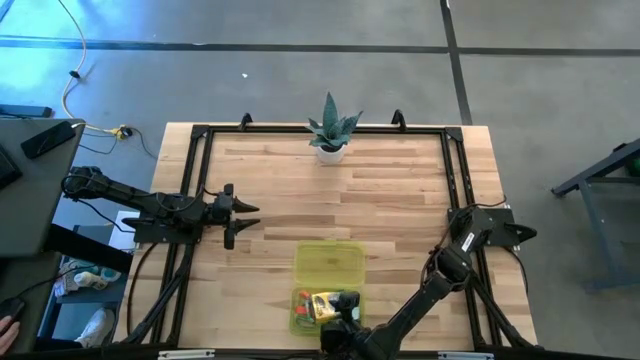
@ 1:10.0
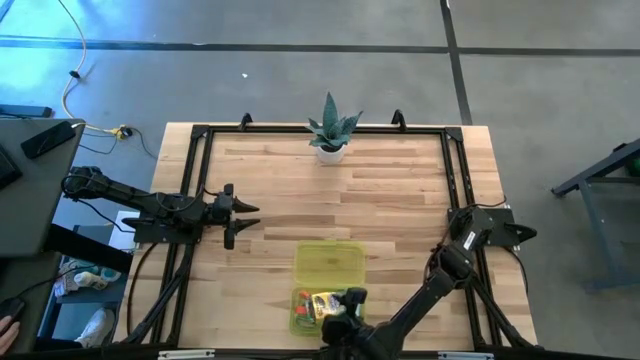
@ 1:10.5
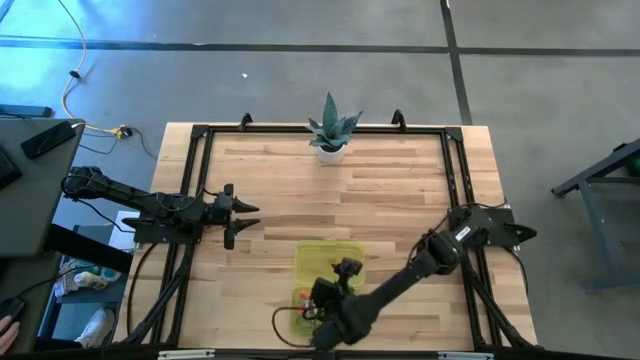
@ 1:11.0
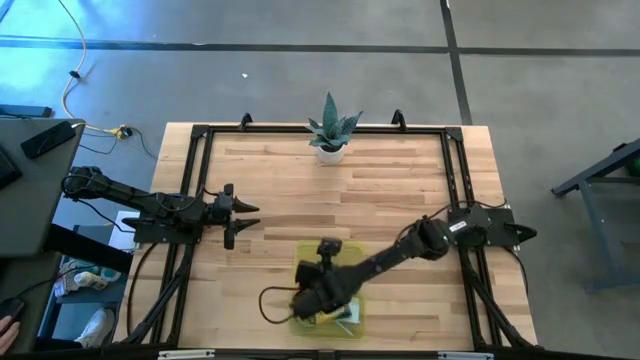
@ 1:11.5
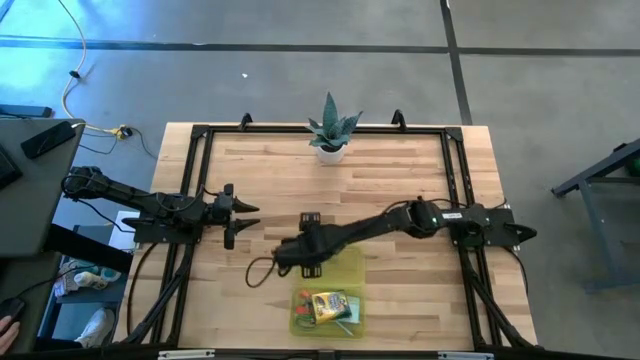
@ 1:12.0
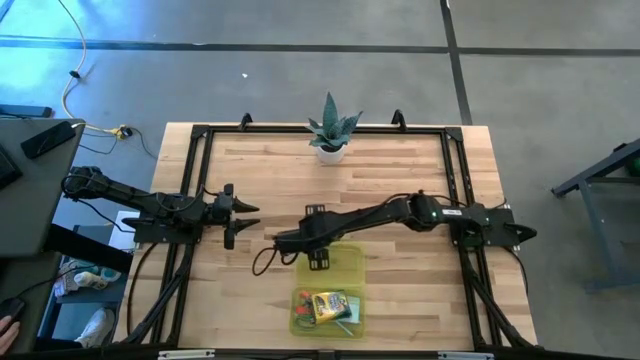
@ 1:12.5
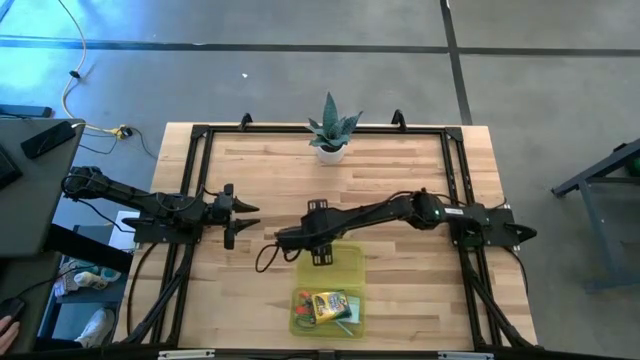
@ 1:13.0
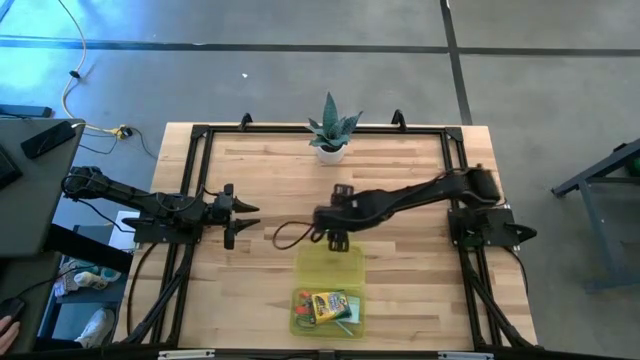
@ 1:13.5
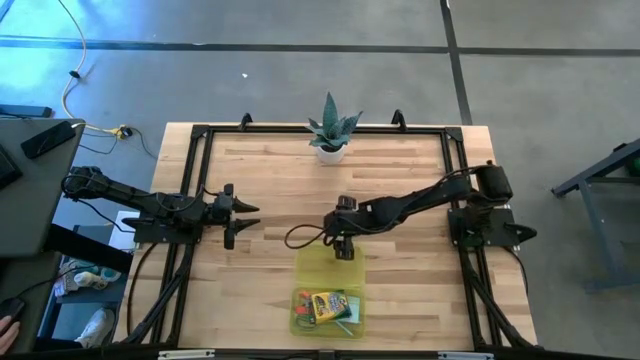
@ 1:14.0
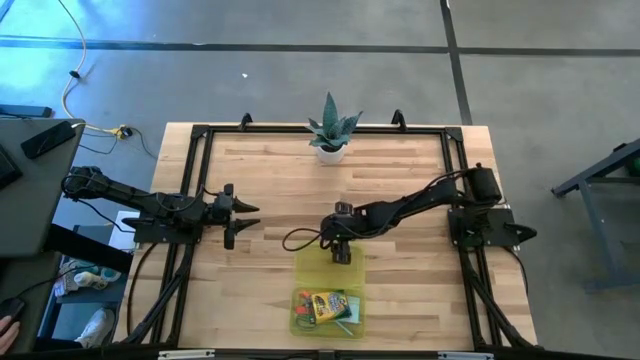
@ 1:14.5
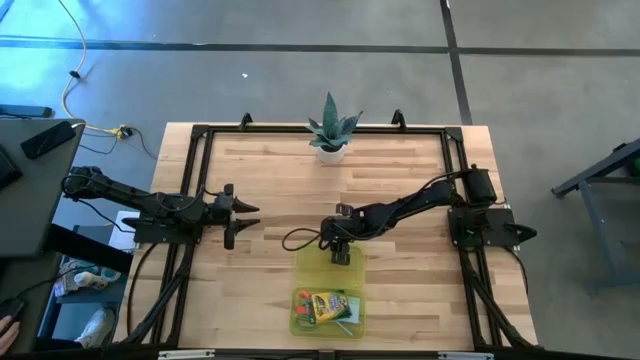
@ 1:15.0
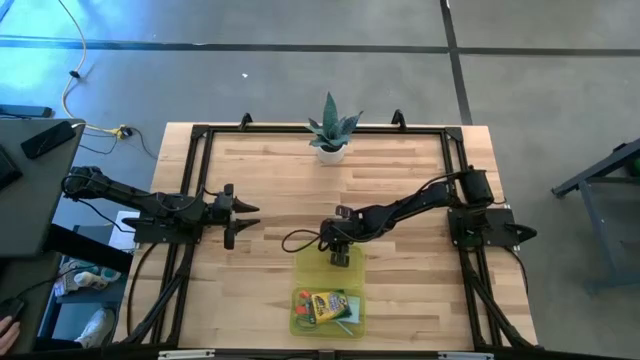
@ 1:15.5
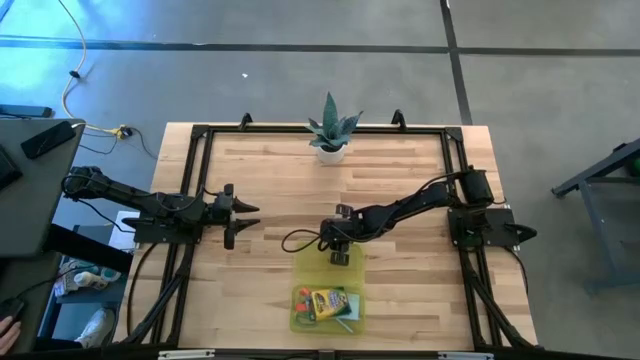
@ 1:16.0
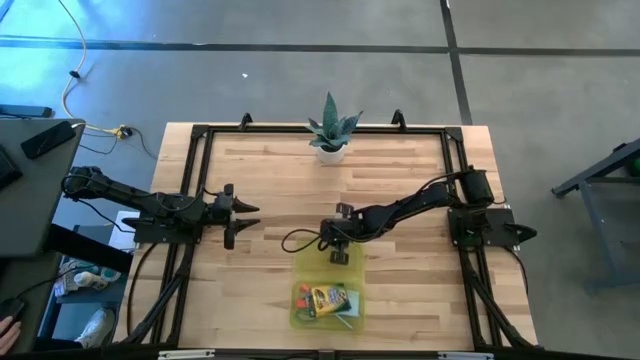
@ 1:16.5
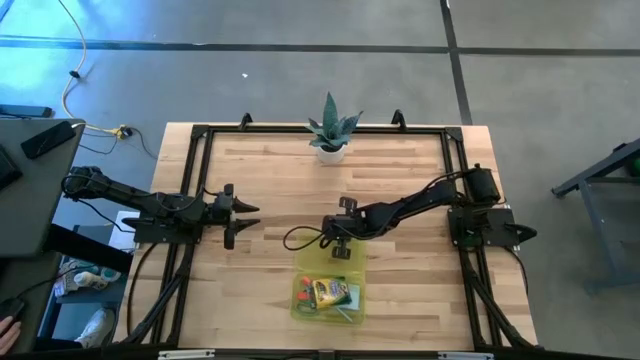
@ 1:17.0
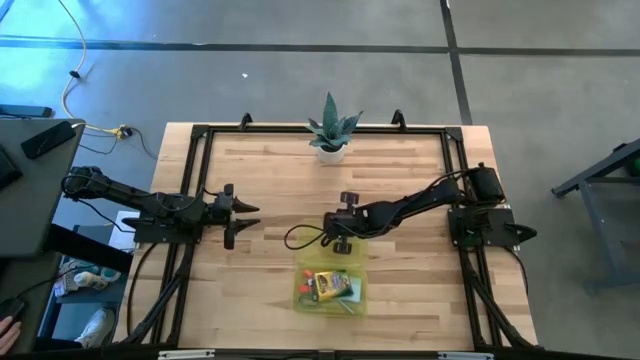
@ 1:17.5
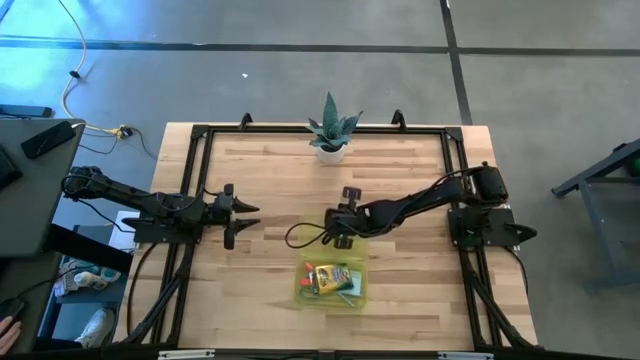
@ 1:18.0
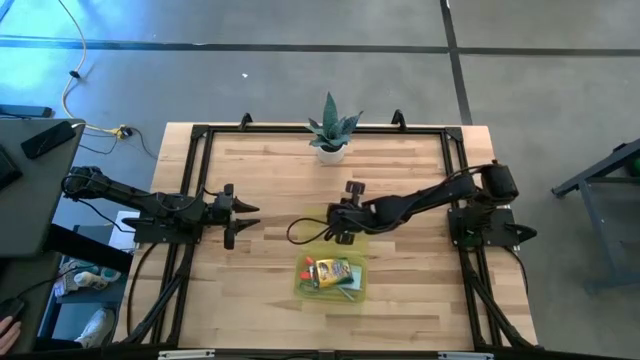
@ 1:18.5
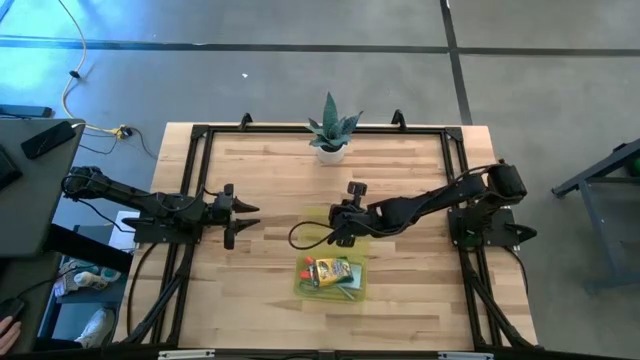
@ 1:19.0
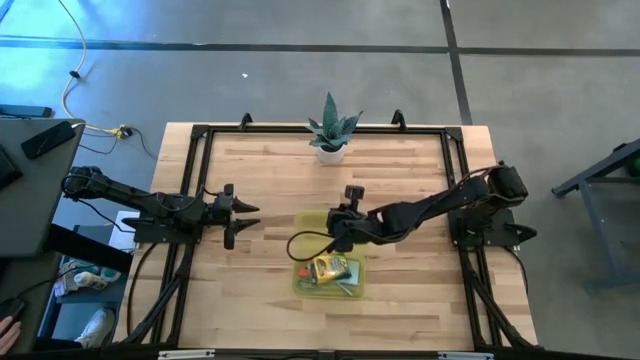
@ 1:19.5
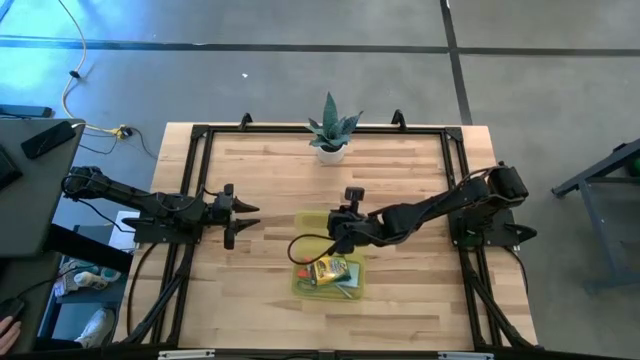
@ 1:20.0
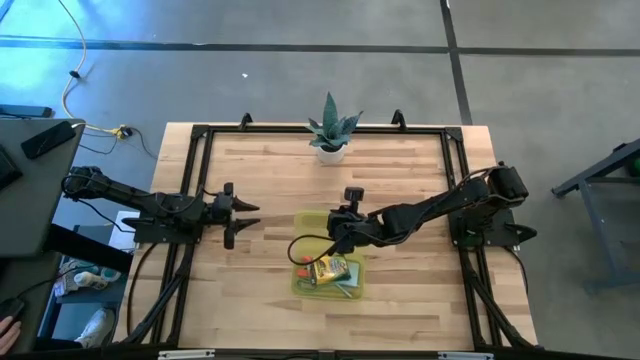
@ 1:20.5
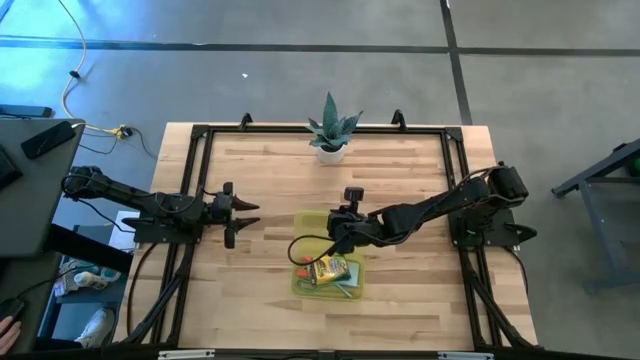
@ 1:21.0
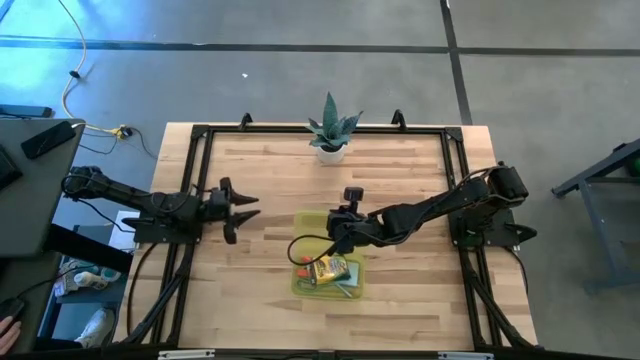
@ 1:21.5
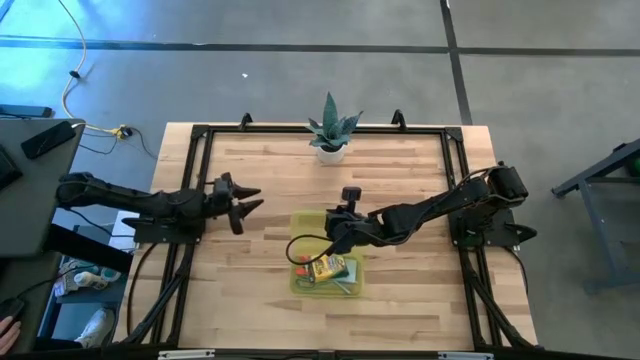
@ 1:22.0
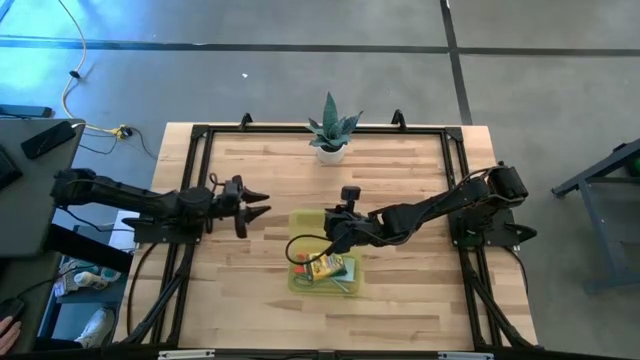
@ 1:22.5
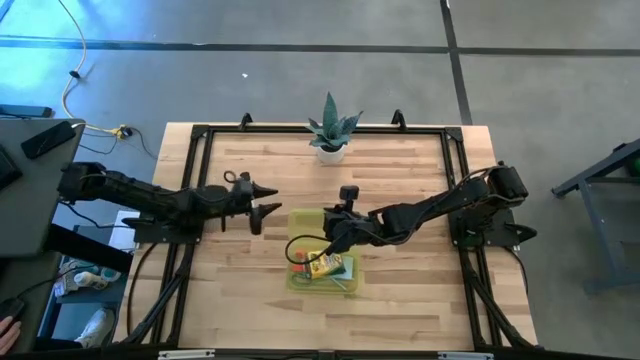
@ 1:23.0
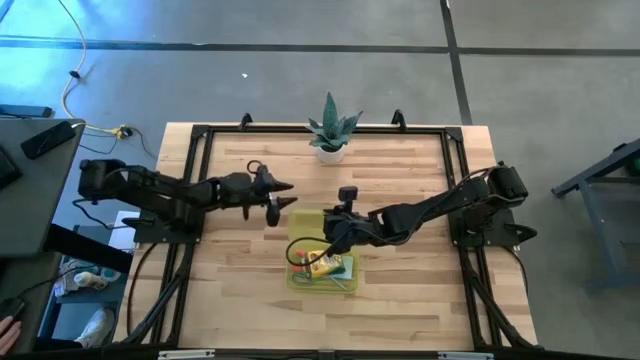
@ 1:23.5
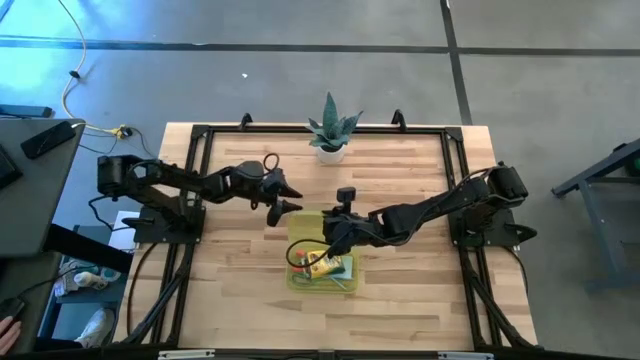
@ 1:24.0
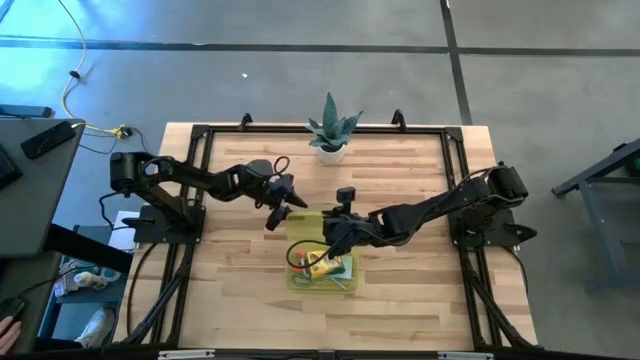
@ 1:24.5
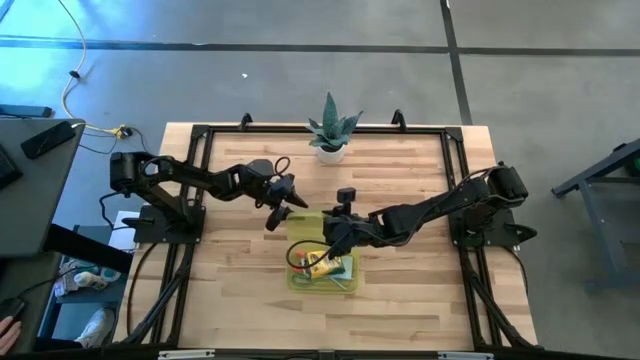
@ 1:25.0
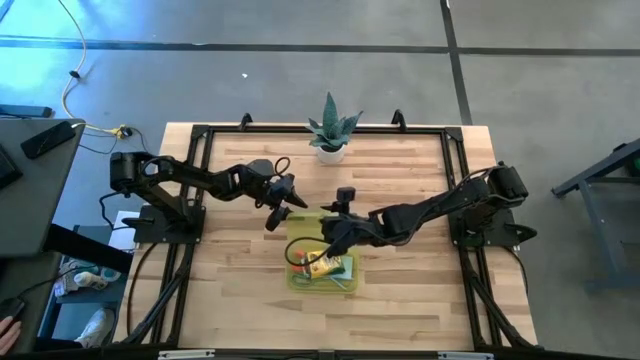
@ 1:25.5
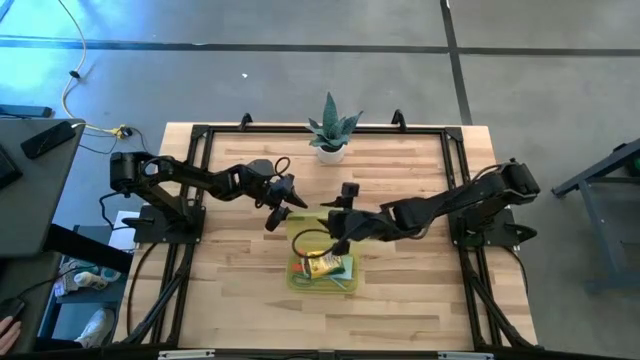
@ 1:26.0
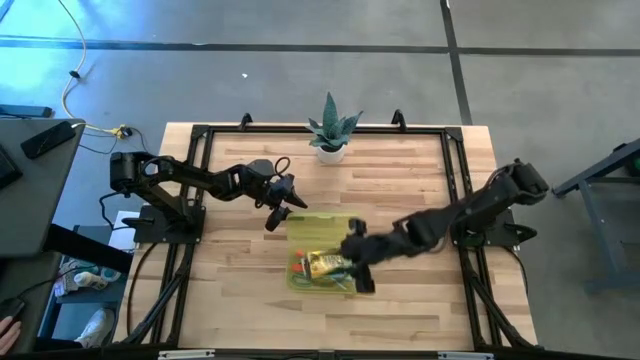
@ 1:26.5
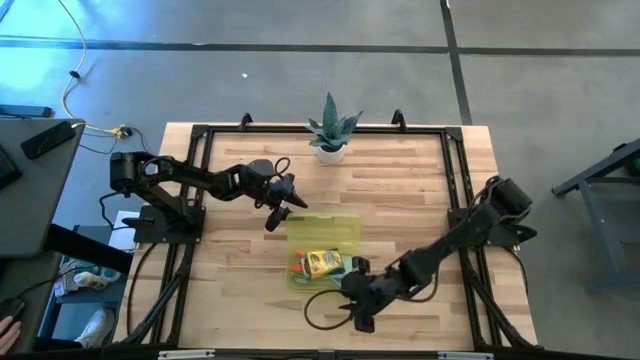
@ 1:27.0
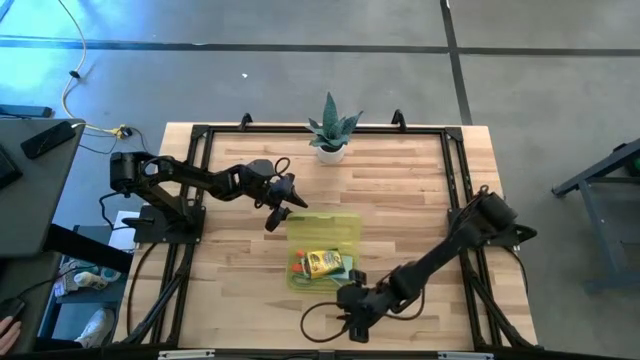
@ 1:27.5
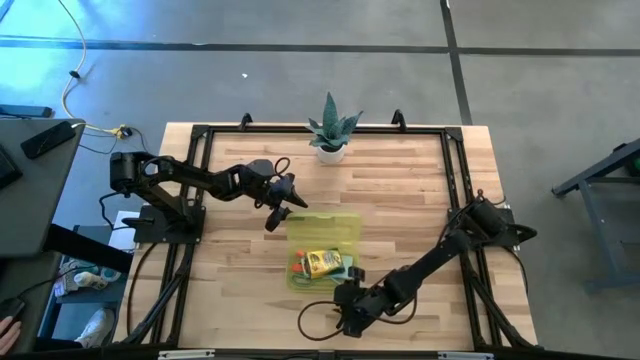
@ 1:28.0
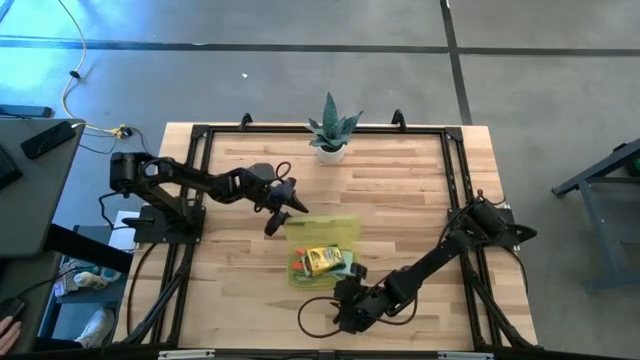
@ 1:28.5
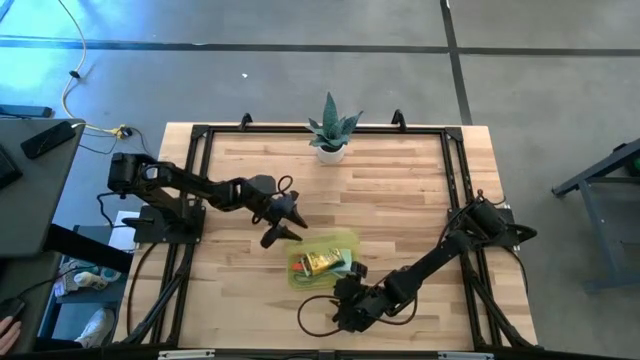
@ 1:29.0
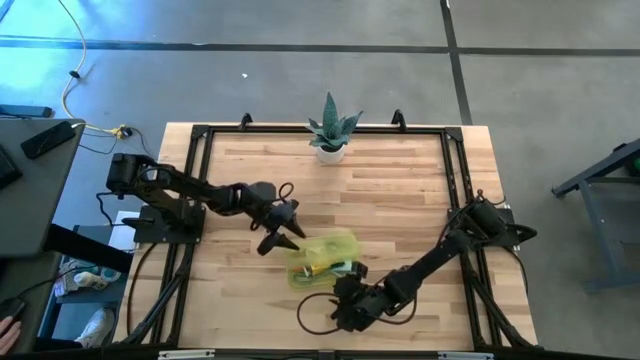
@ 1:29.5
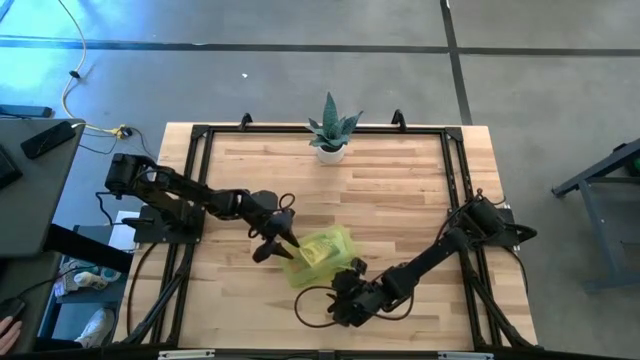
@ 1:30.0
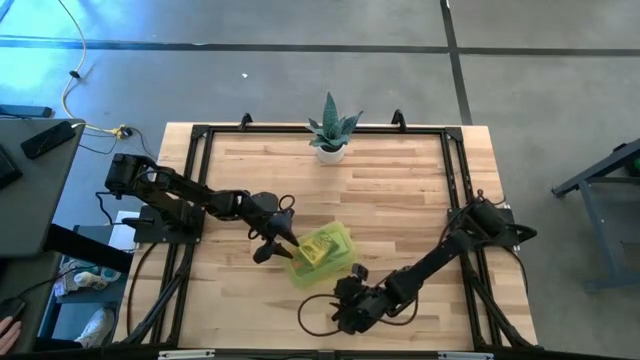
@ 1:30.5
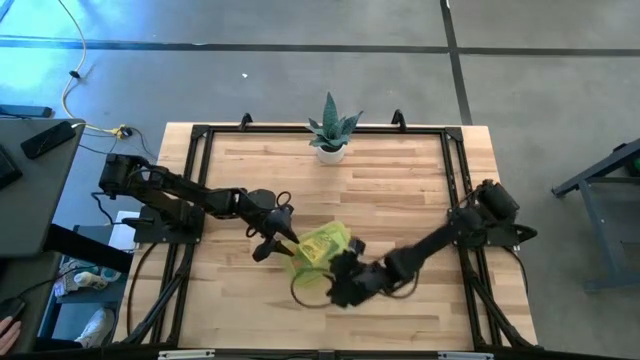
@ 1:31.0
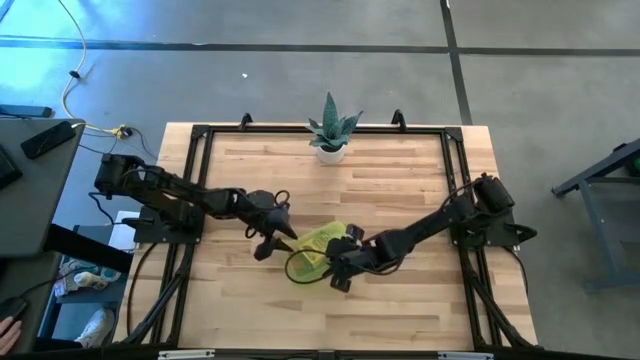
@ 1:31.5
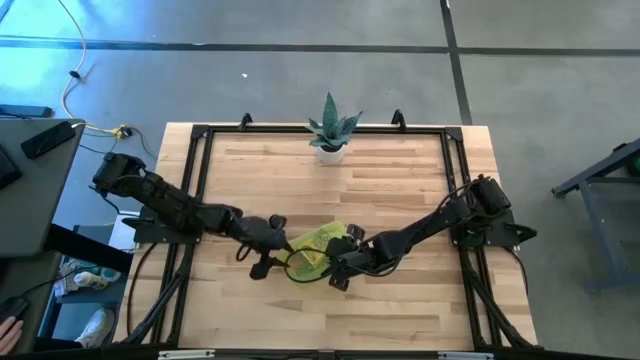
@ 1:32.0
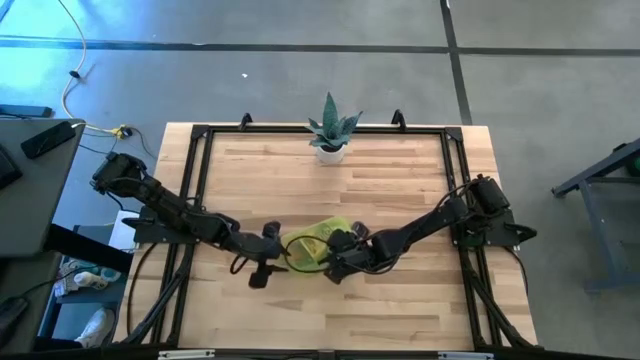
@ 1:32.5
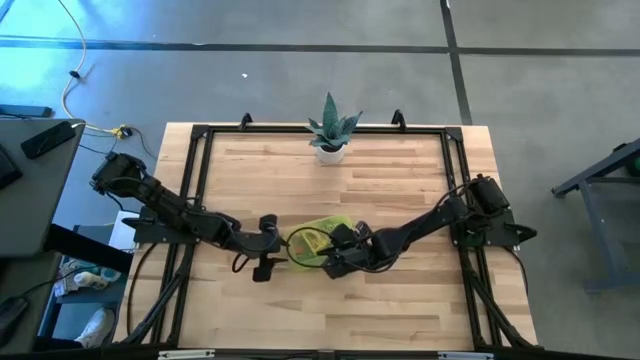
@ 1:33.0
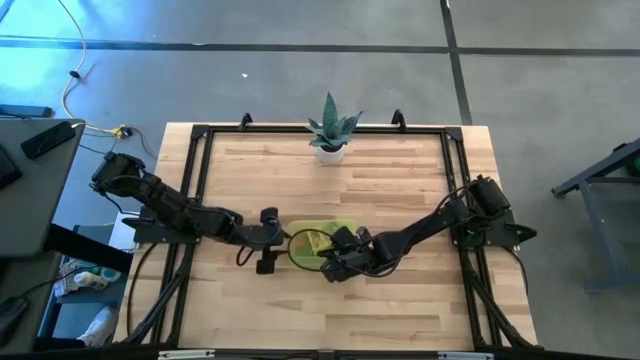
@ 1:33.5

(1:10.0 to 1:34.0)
Task: Pack school essentials
Close the yellow supply box
